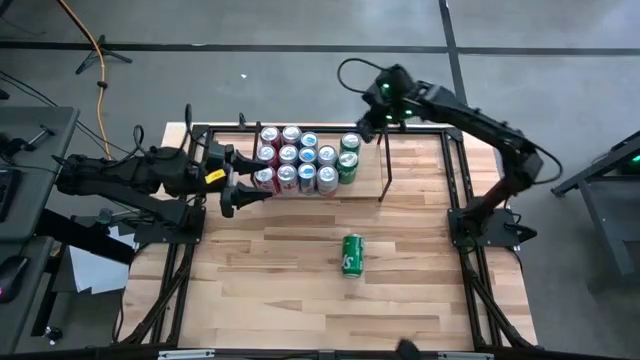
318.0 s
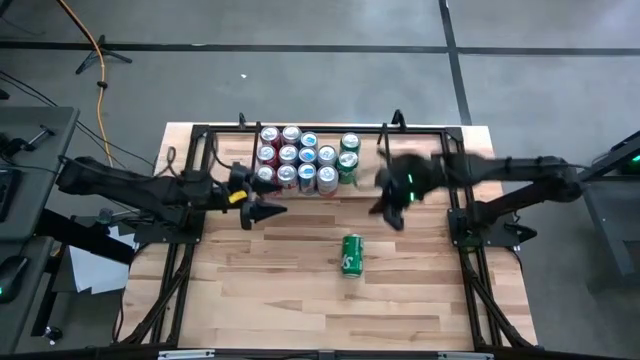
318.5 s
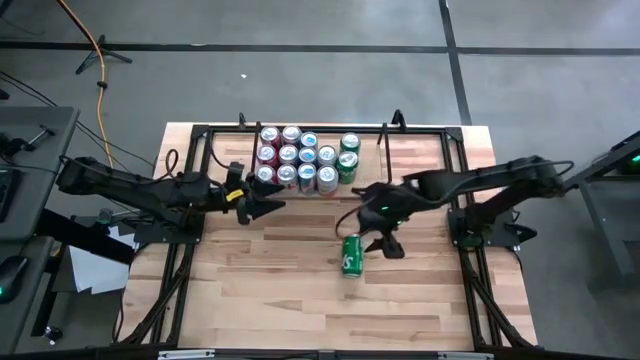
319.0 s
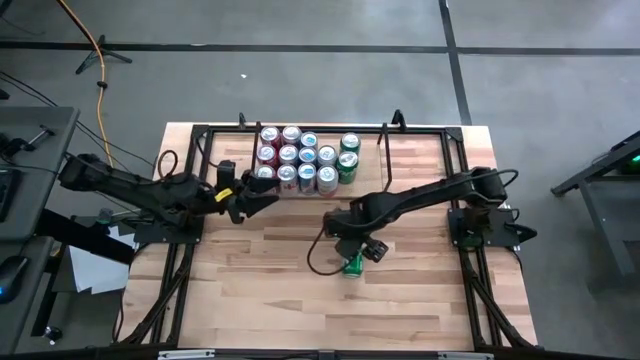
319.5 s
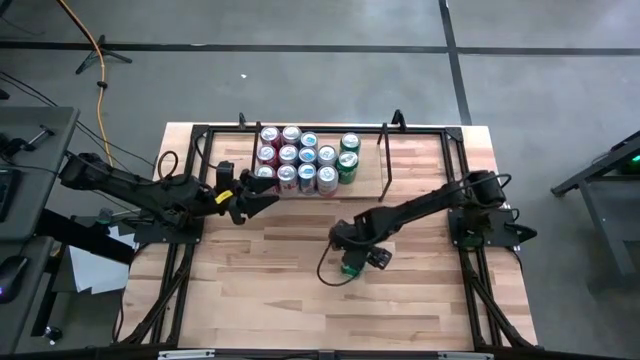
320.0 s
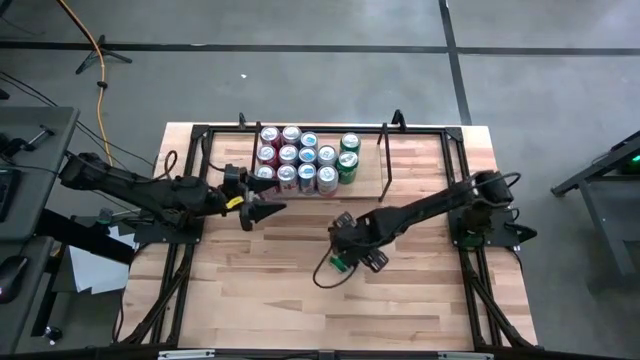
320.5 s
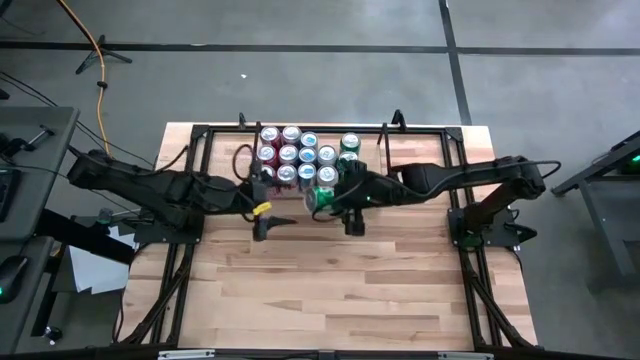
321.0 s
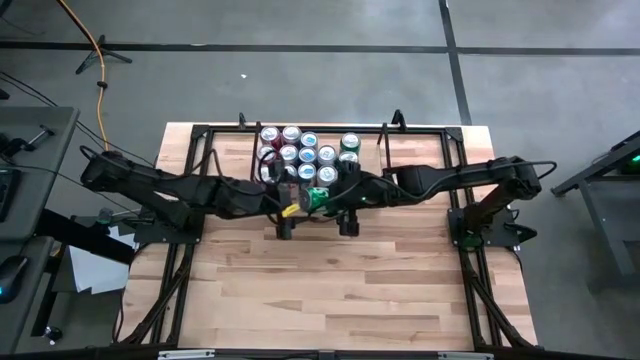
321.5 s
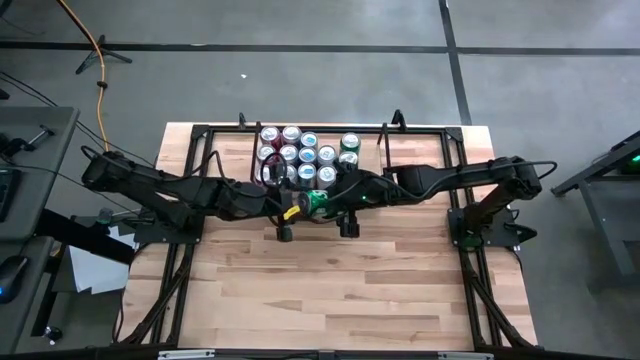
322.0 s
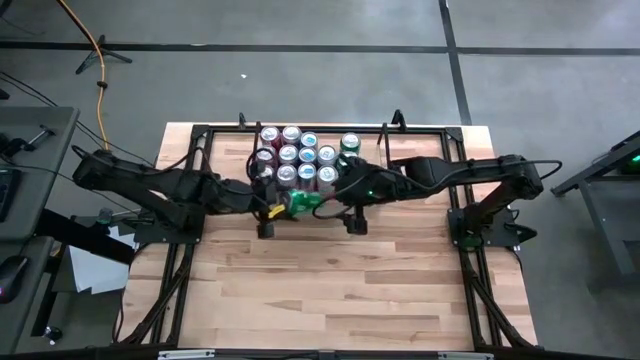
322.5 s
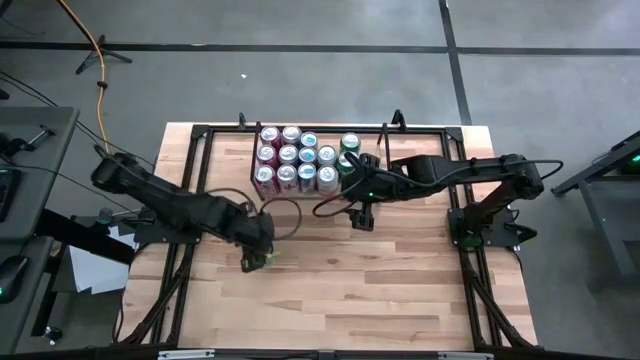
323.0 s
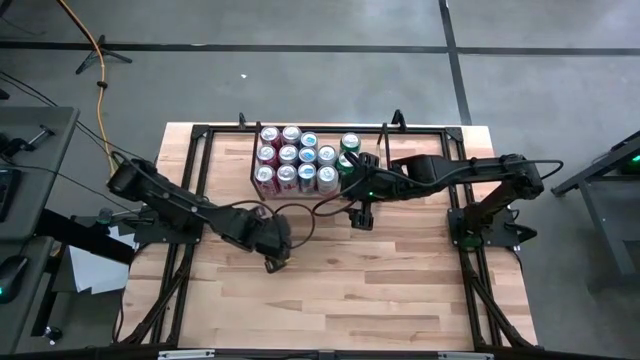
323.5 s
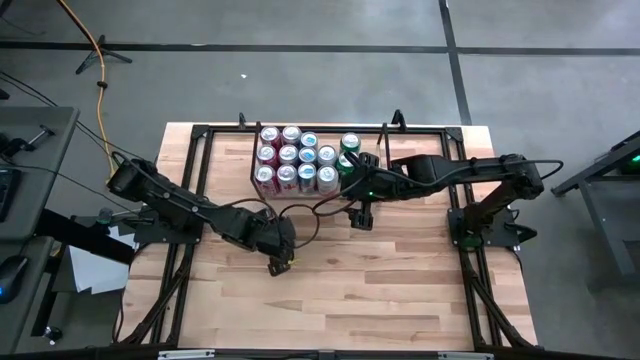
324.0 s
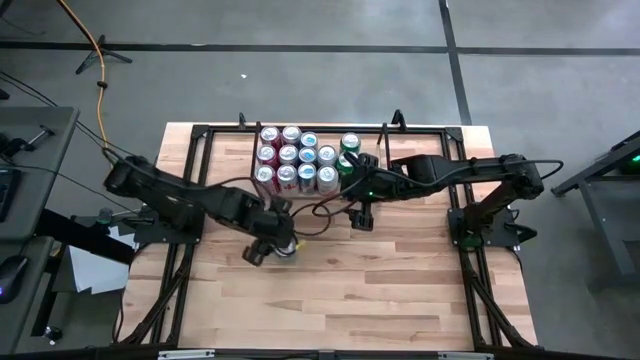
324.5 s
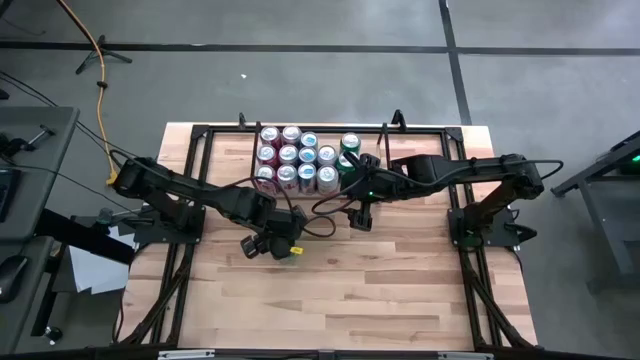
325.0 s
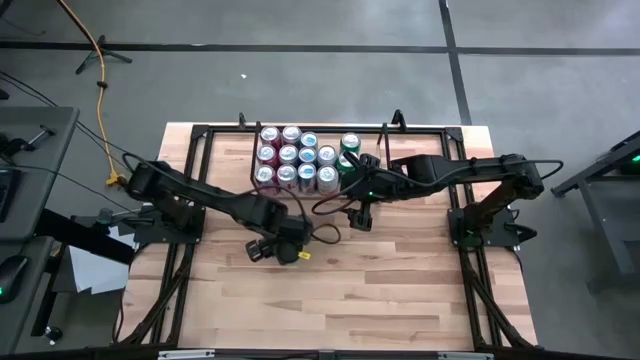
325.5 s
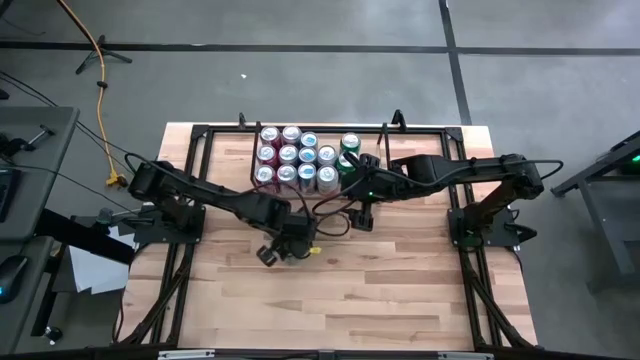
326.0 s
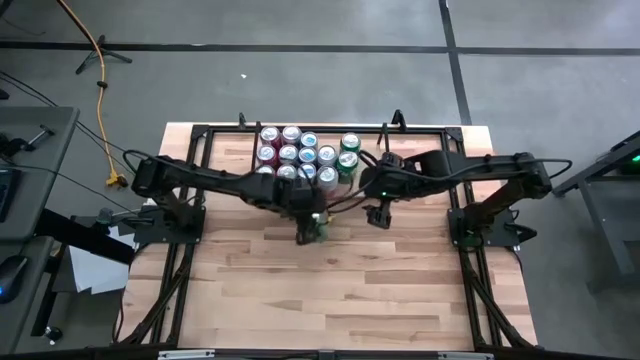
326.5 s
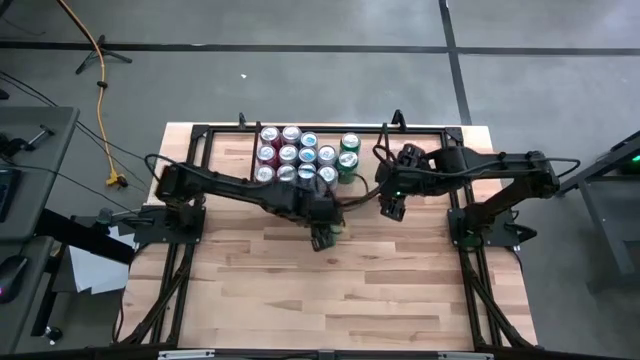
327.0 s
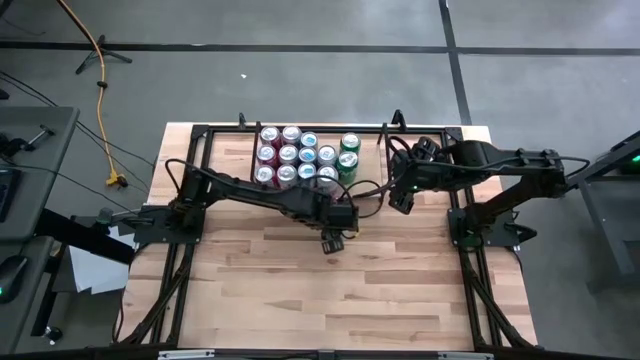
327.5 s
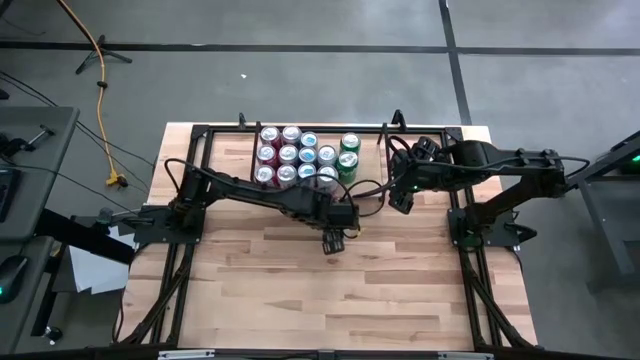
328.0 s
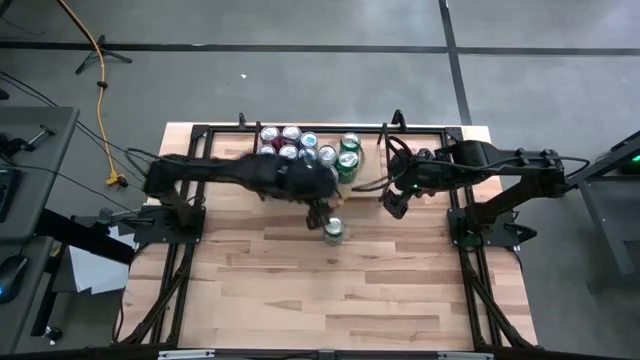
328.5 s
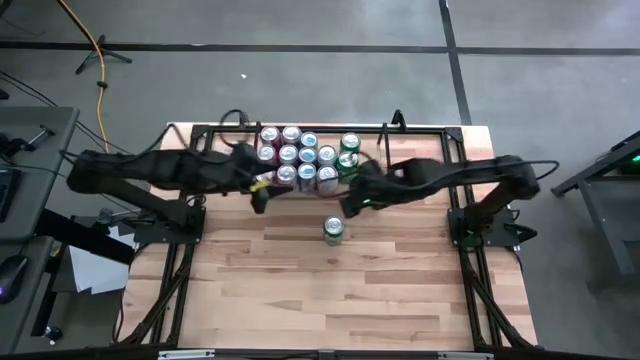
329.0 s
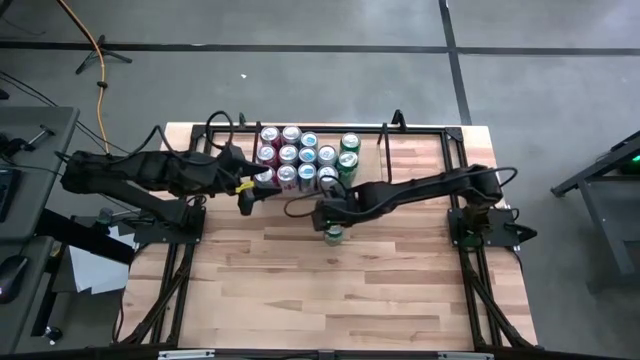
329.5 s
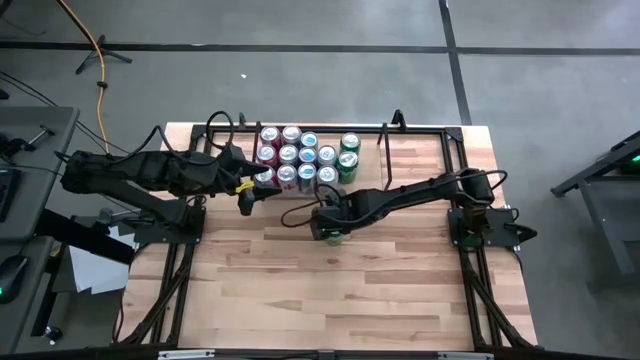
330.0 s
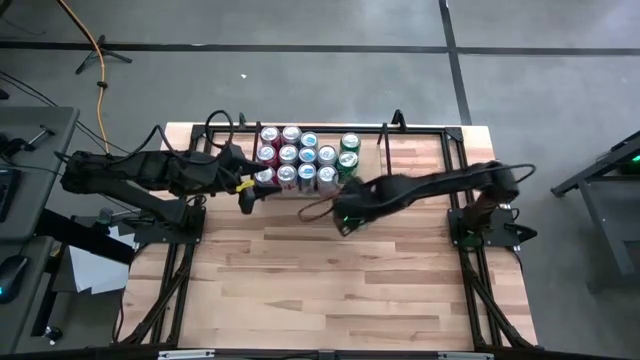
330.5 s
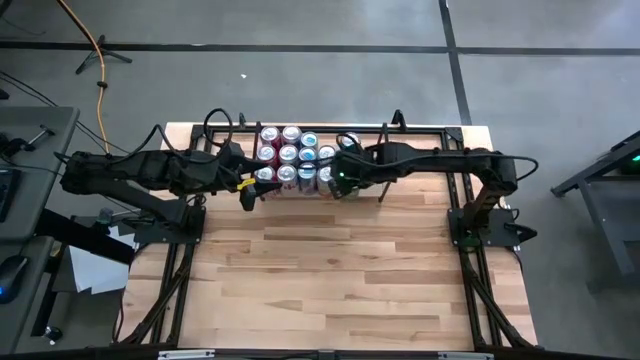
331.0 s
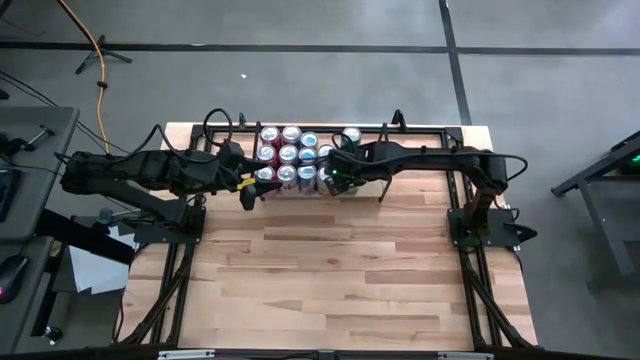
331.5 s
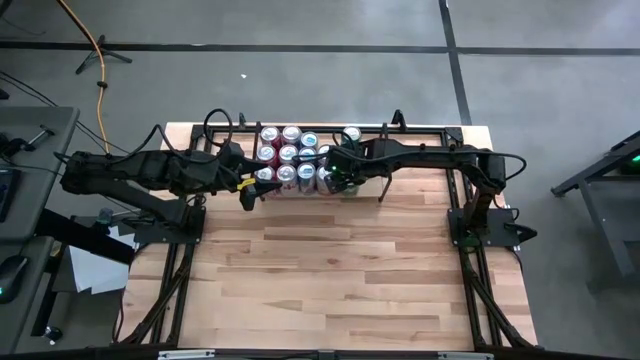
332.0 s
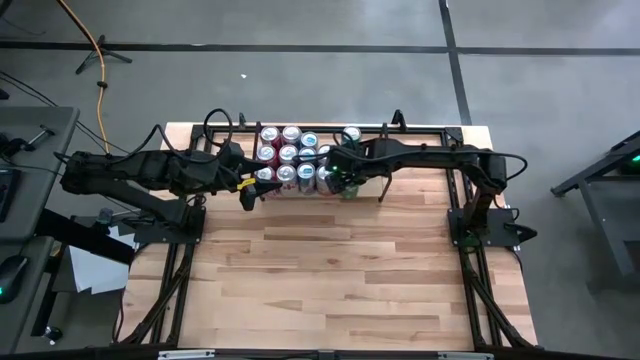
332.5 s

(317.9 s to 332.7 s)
Task: Place canned beverage on shelf
Put the green soda can on the shelf aligned with the other green soda cans

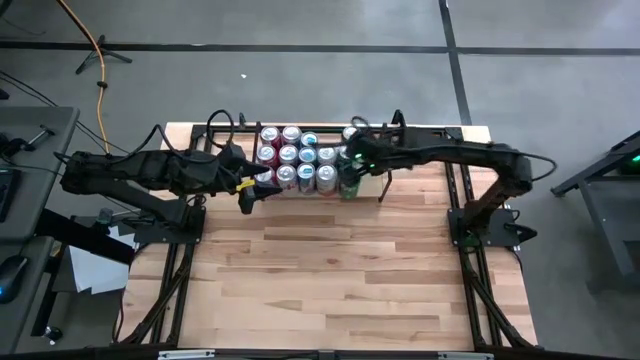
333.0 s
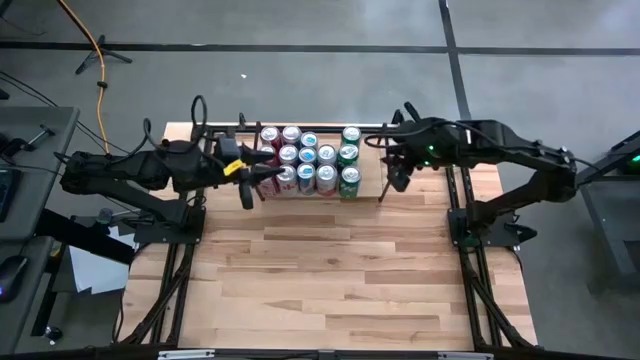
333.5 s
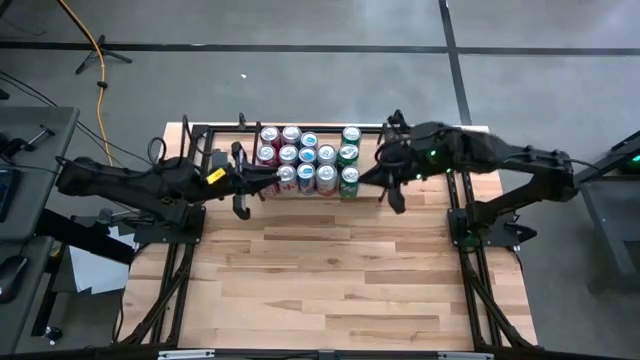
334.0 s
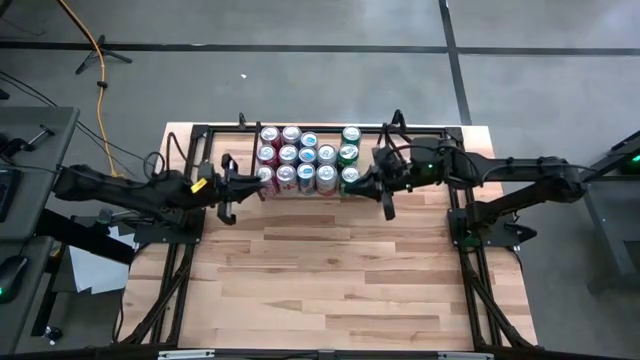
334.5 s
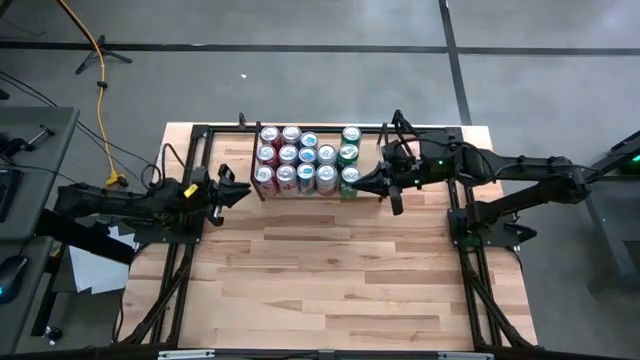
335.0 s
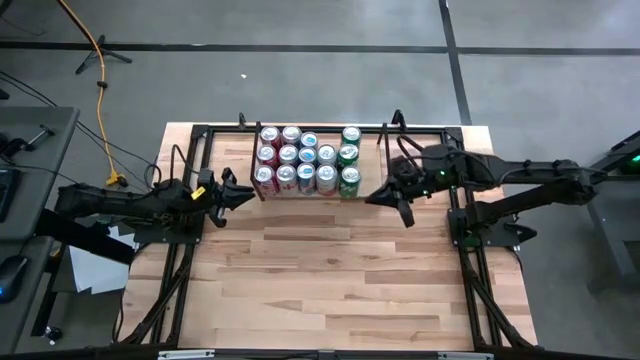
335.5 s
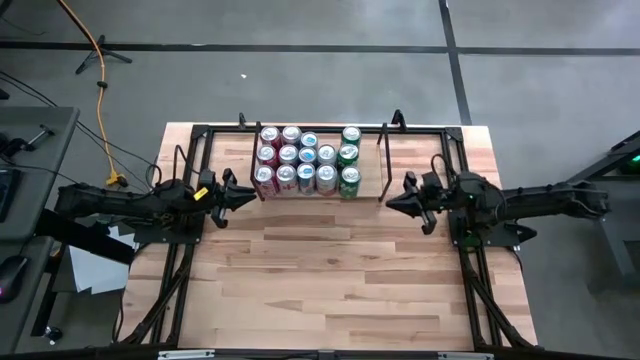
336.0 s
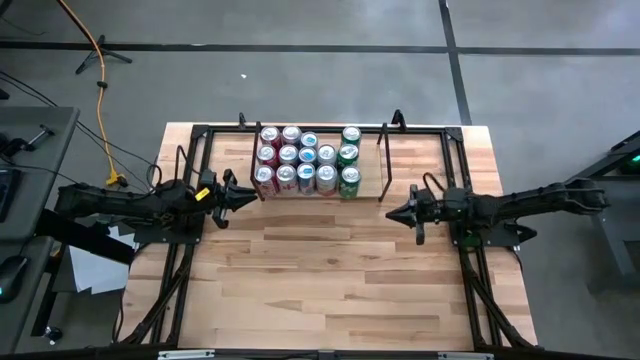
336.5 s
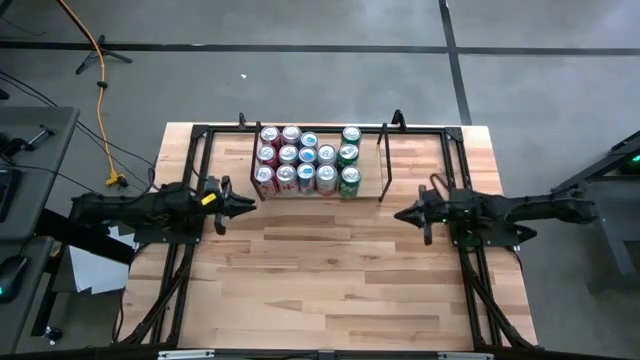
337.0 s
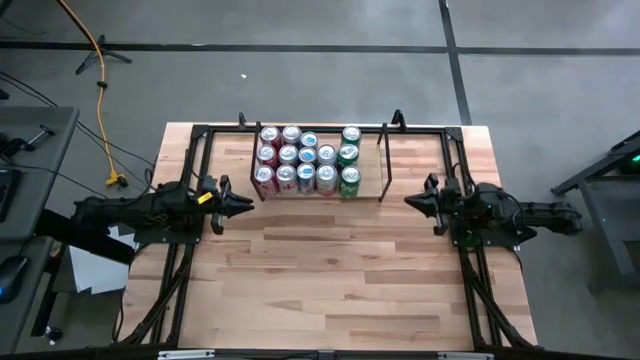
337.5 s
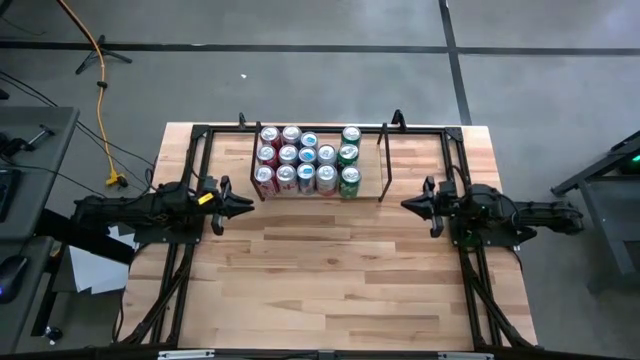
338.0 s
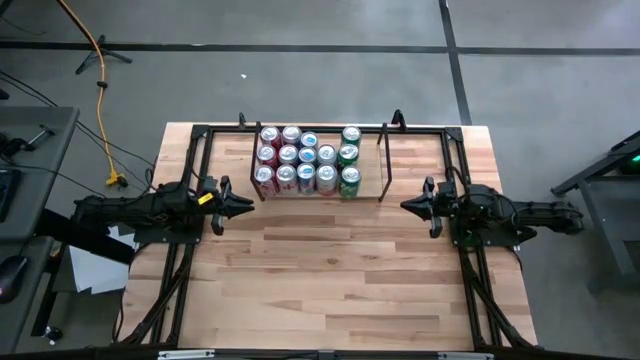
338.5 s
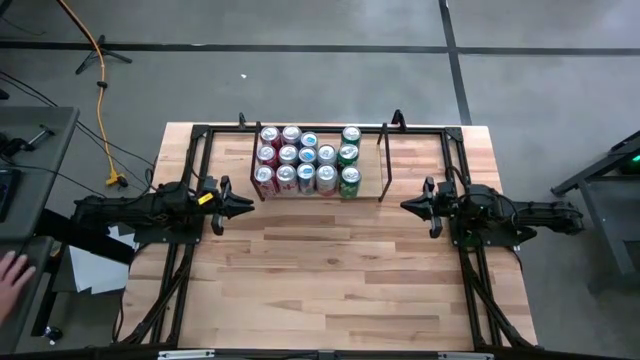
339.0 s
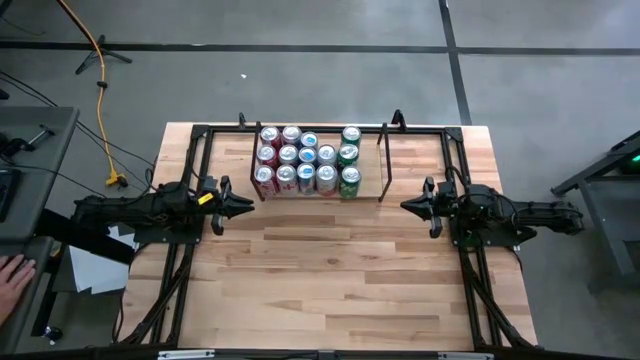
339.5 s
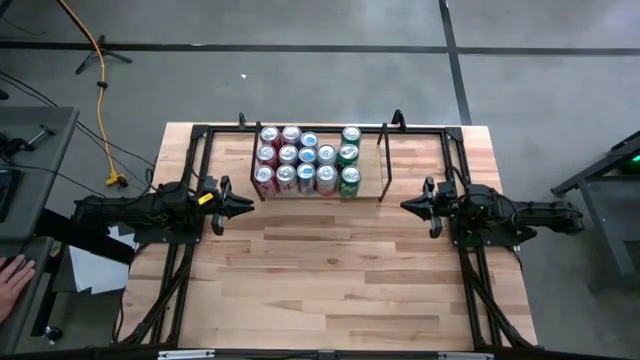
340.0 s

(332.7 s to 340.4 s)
Return to Home Position
